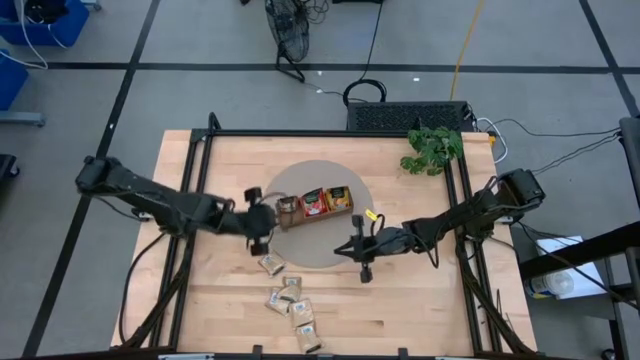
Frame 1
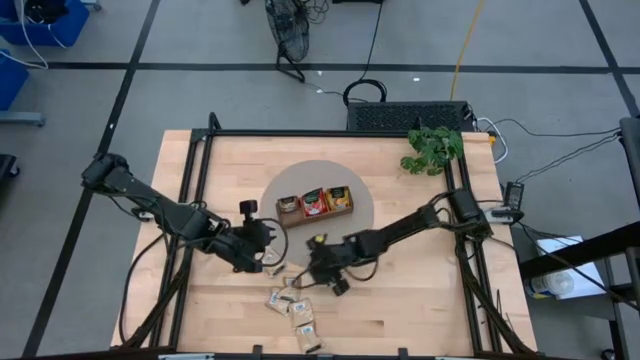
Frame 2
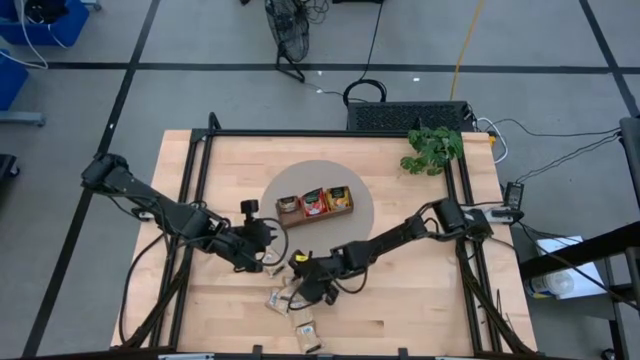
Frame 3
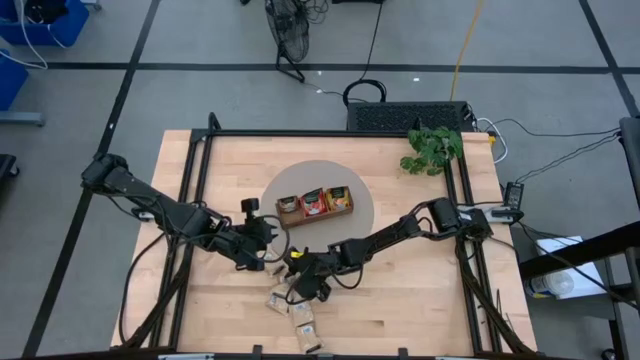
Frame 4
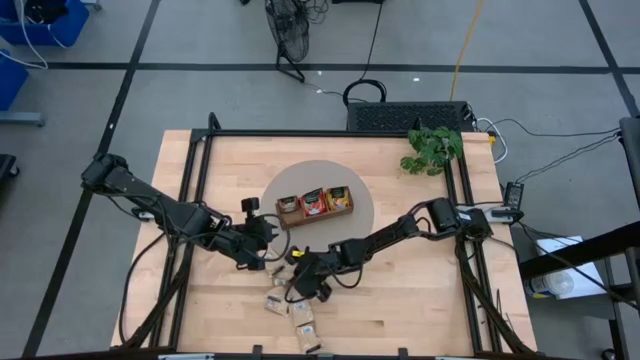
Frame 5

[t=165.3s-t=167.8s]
Task: Pick & Place Tea
Put the brown tea bag into the wooden organizer

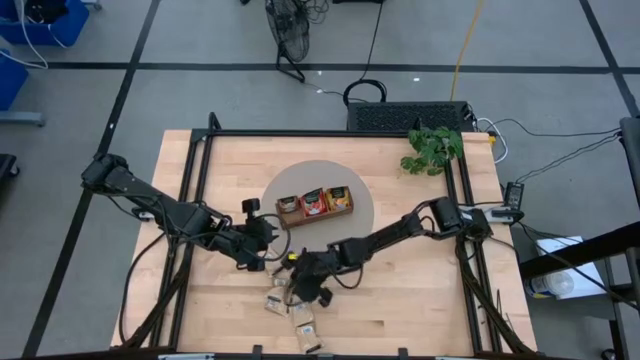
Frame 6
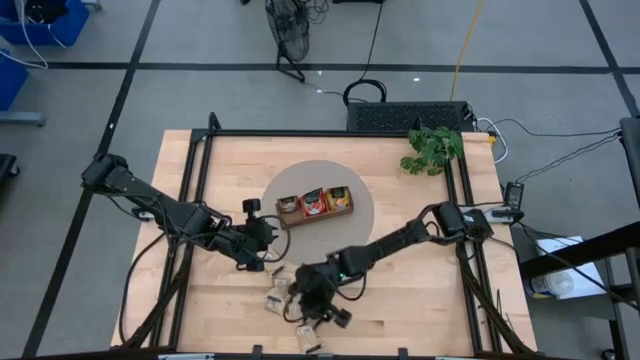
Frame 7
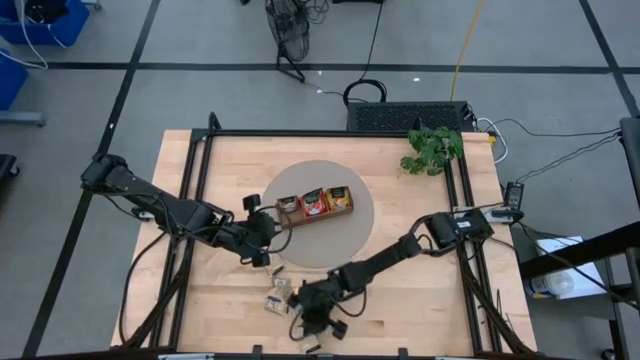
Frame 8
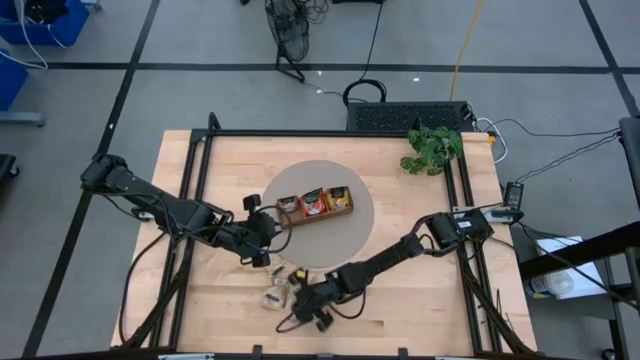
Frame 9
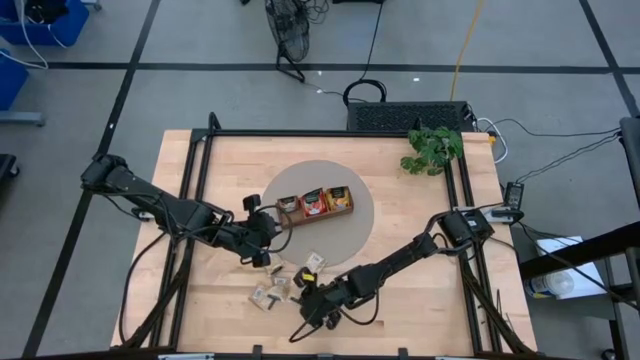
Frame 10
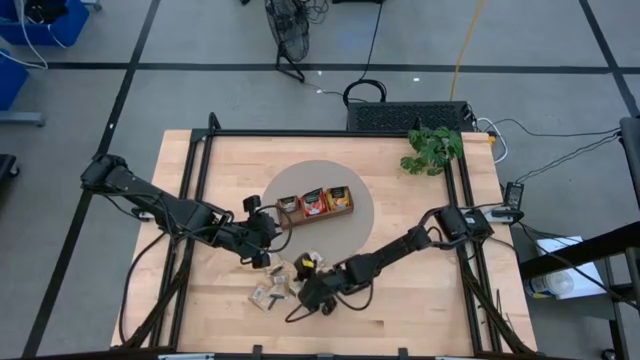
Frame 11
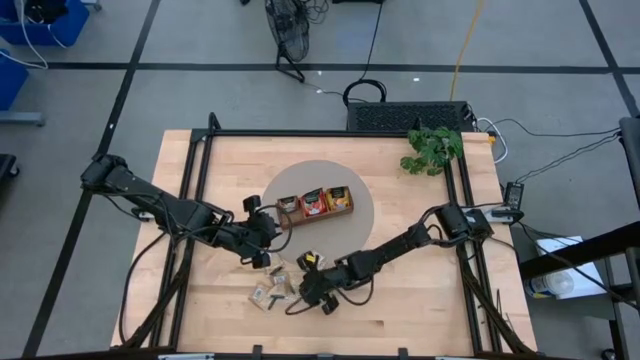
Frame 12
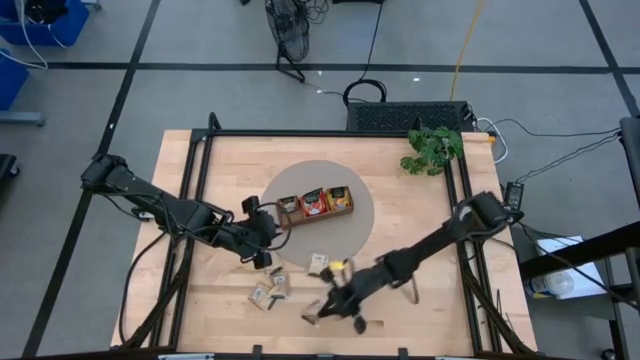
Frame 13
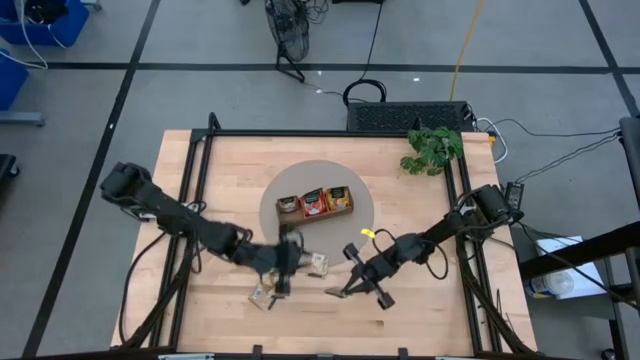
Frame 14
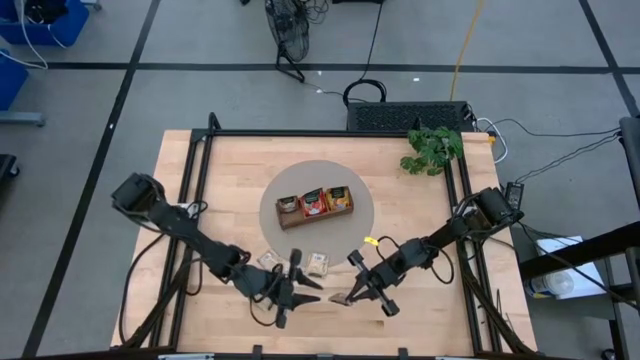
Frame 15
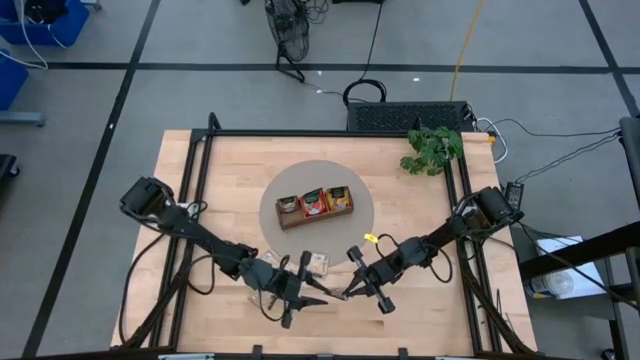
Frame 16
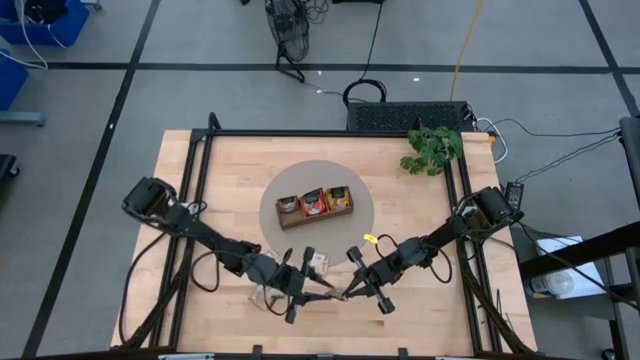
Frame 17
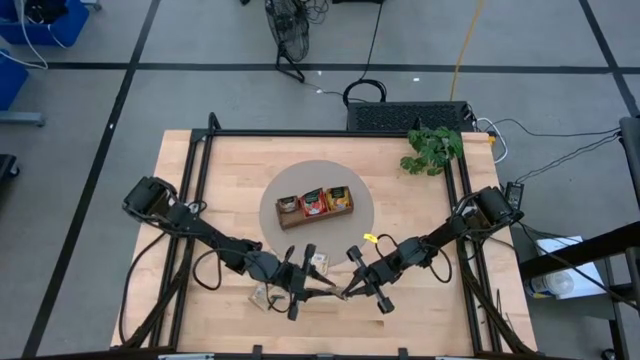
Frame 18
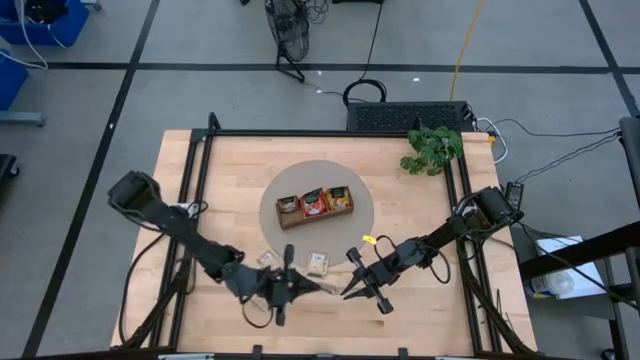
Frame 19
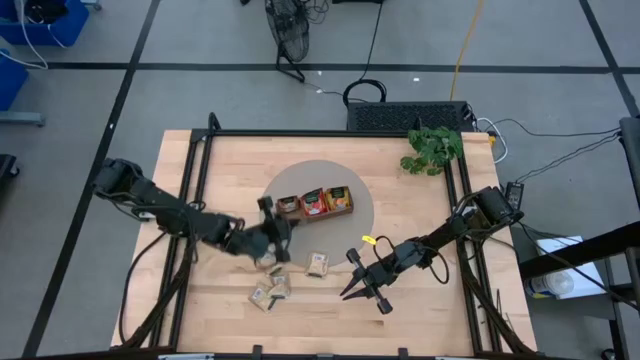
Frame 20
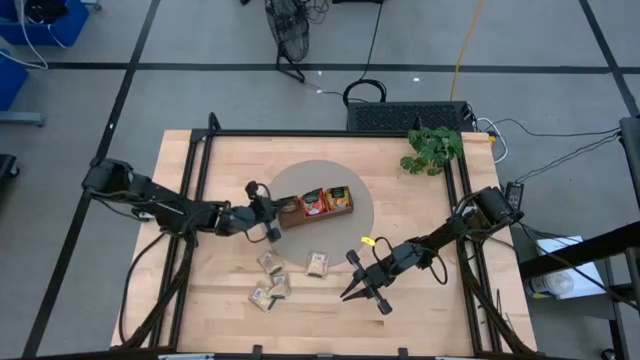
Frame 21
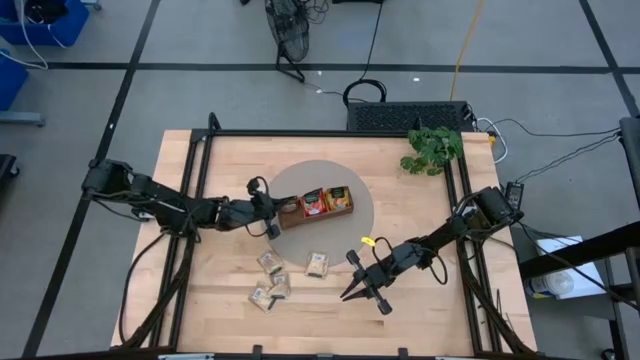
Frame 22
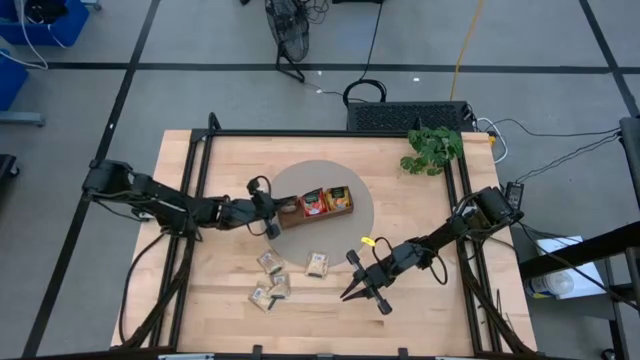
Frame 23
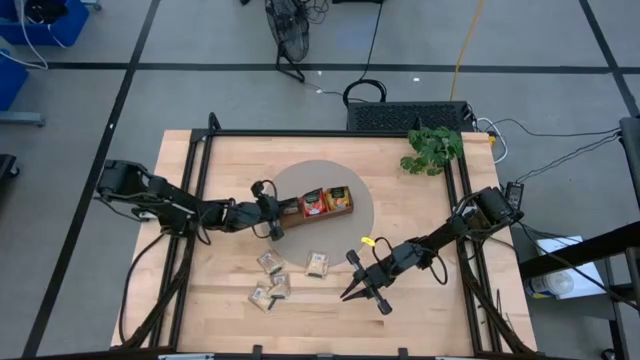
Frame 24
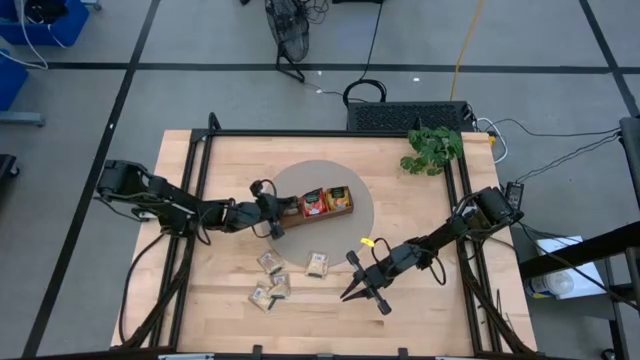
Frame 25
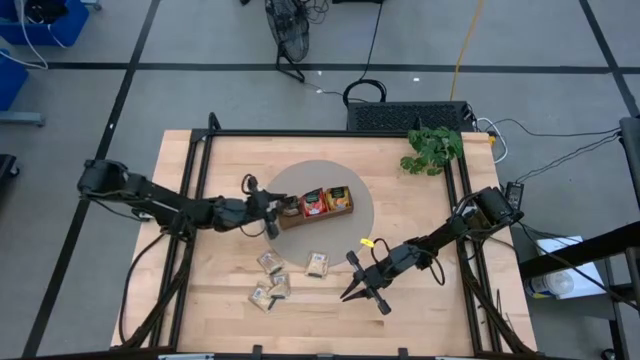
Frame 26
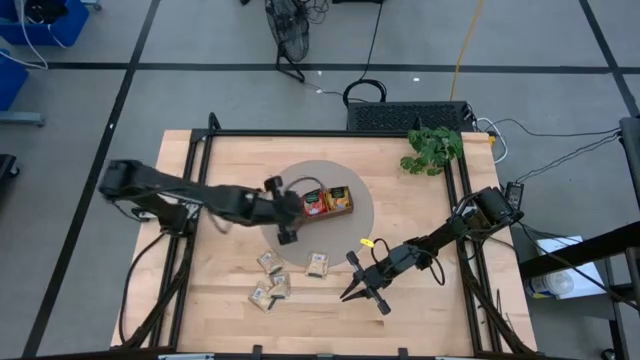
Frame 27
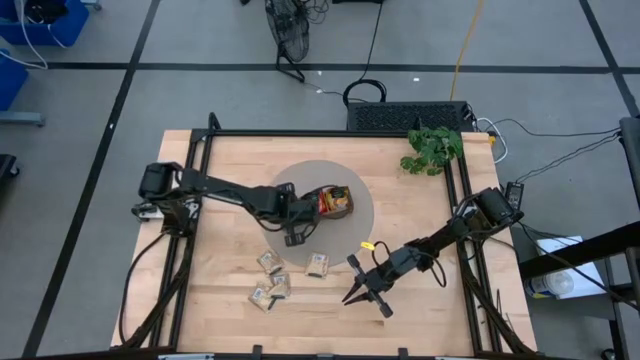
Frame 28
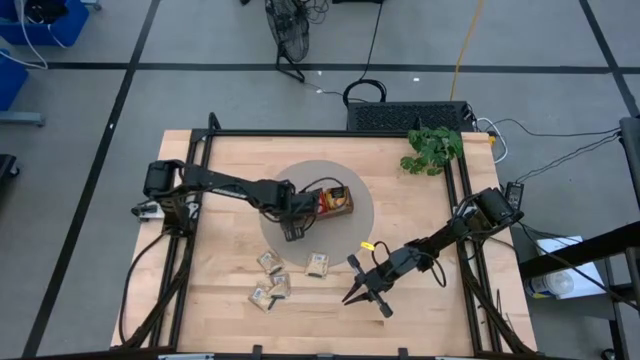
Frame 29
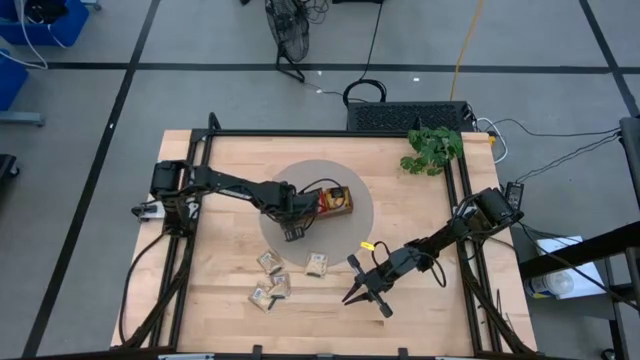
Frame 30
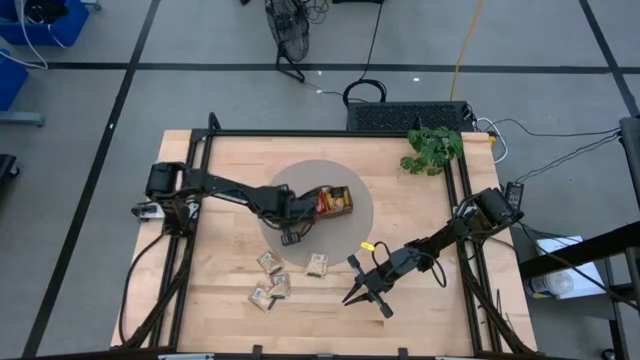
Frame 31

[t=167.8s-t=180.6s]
Put the brown tea bag into the wooden organizer

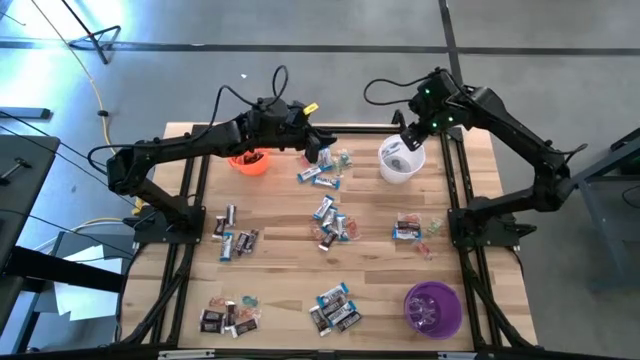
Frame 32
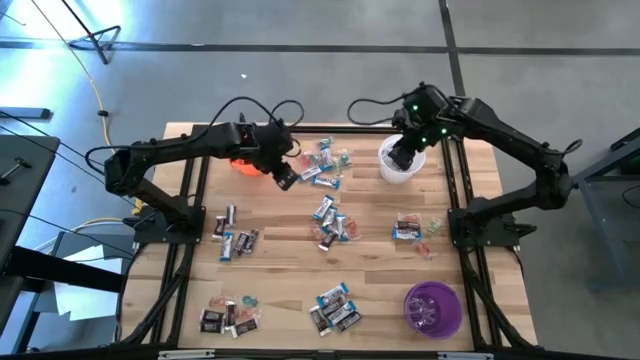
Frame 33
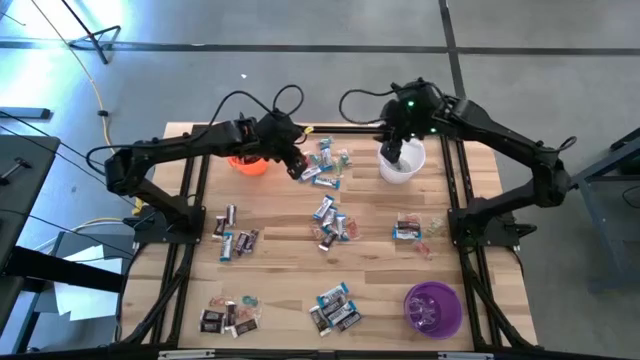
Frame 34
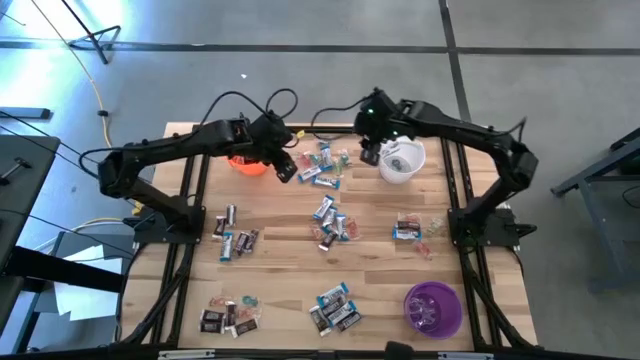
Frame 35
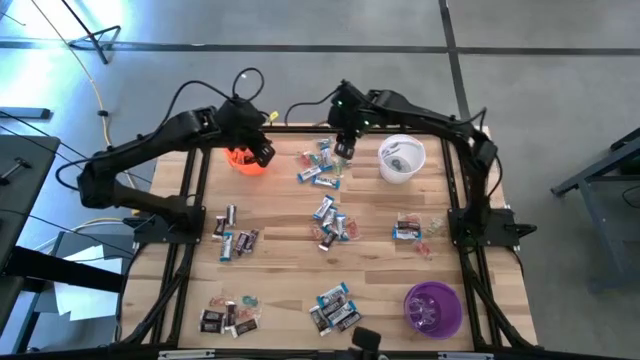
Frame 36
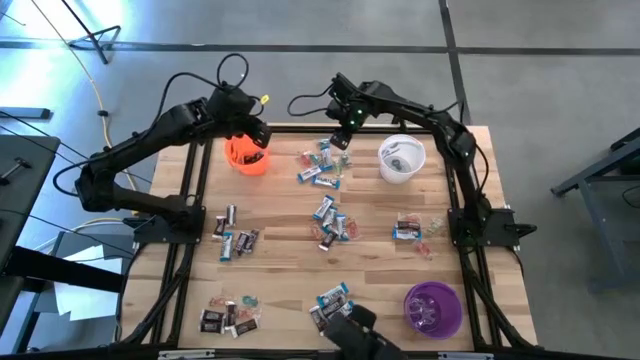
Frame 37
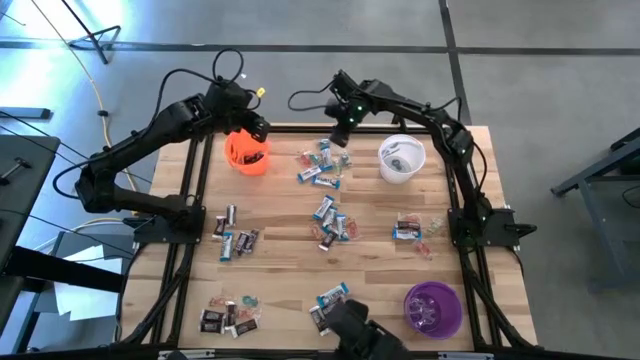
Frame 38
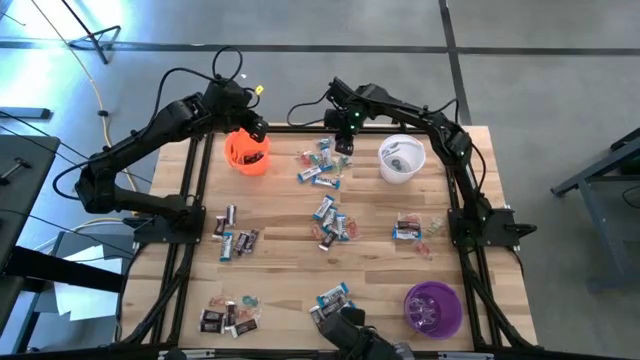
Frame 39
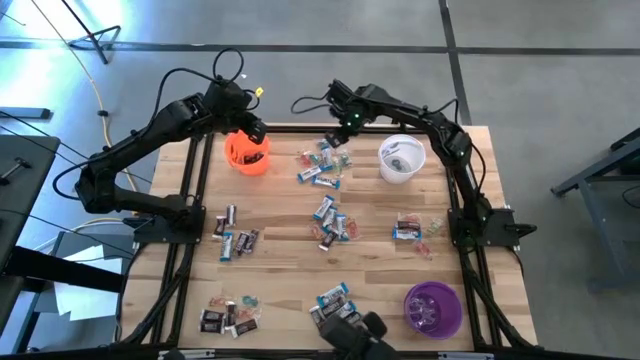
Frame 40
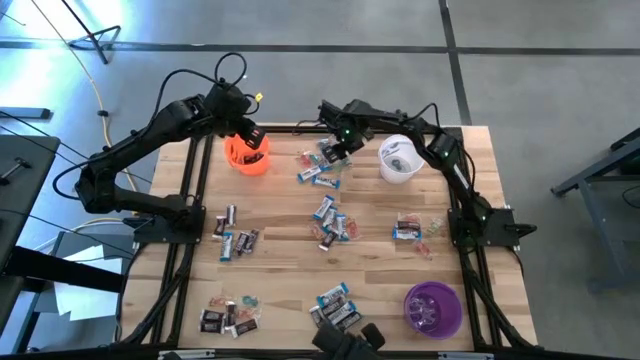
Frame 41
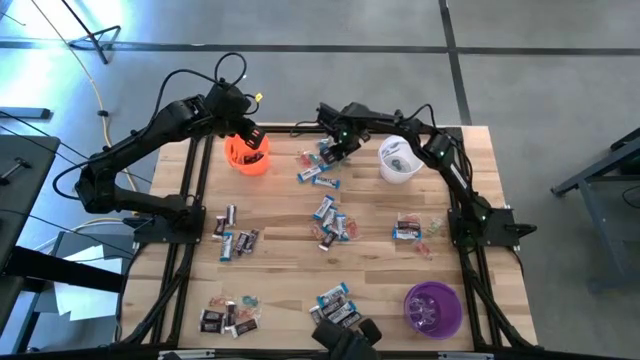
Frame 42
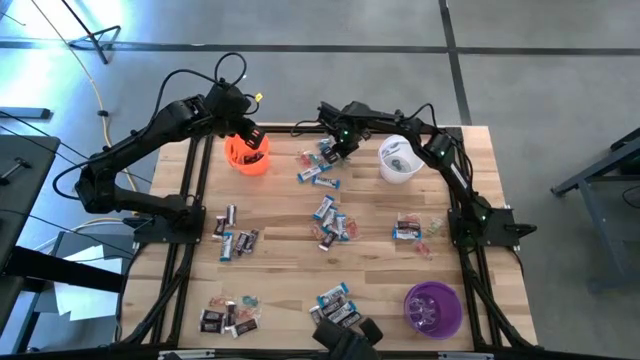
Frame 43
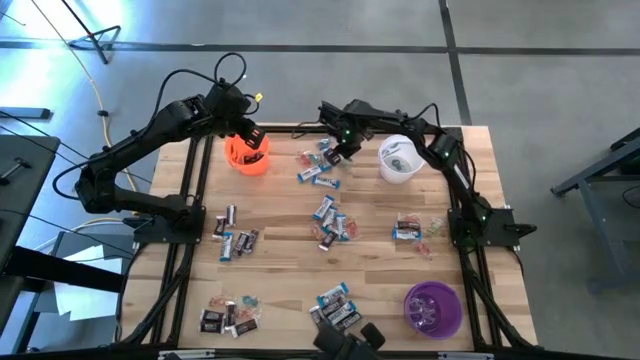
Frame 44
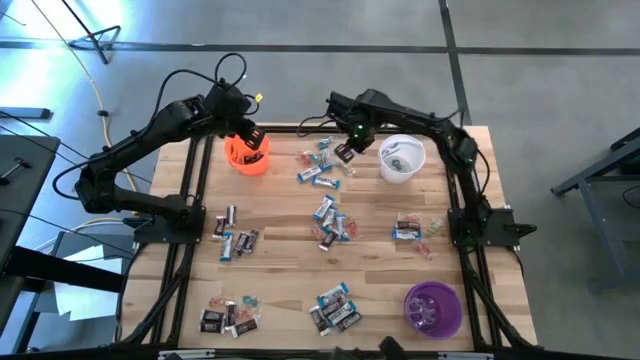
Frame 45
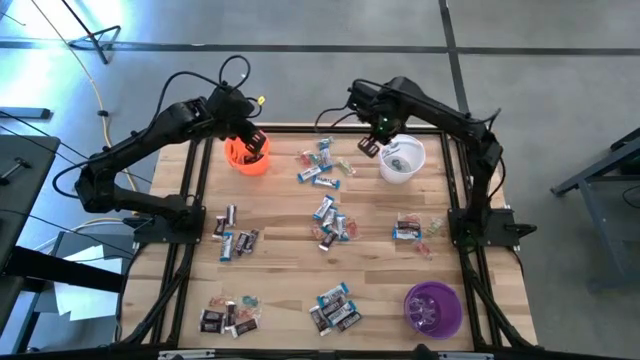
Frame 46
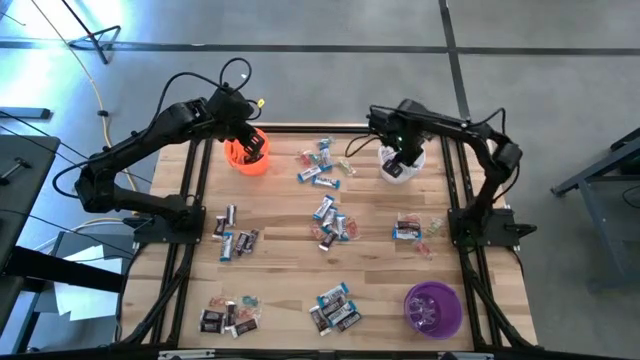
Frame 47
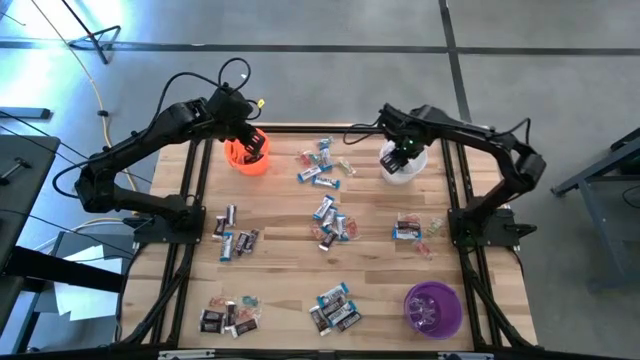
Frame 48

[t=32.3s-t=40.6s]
Task: Sort candy
Put the blue gummy into the white bucket
